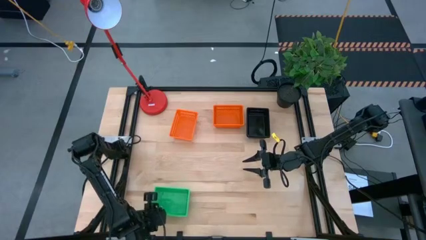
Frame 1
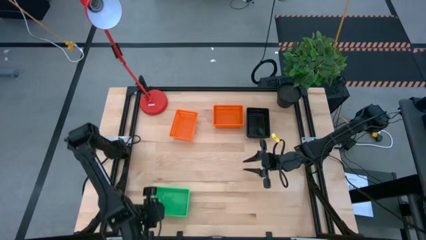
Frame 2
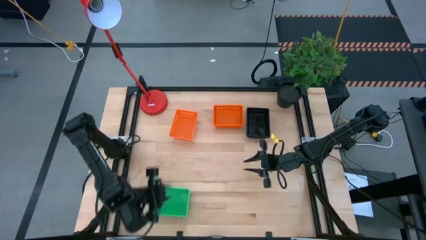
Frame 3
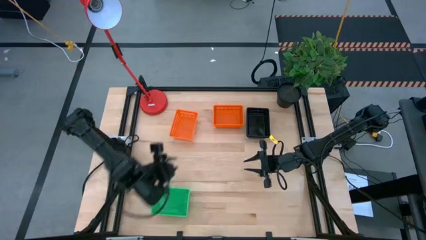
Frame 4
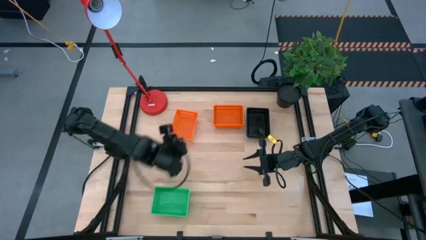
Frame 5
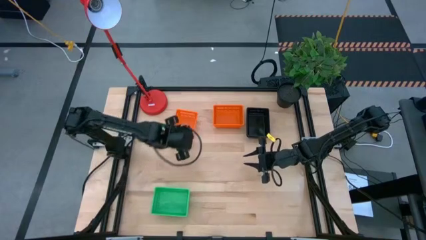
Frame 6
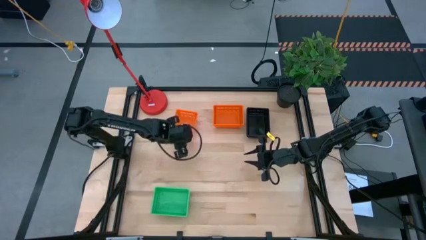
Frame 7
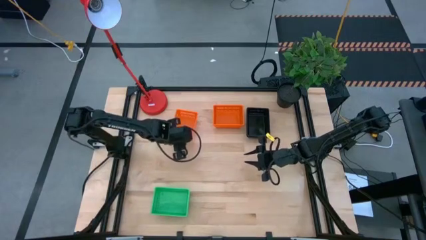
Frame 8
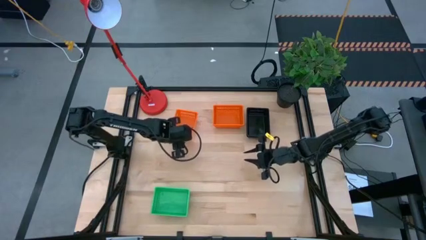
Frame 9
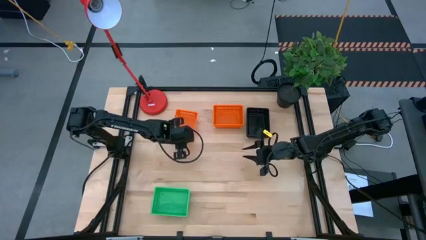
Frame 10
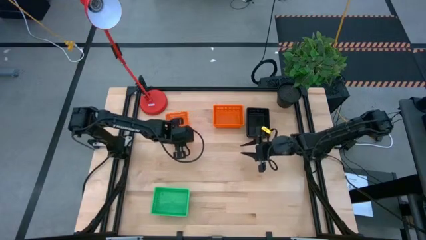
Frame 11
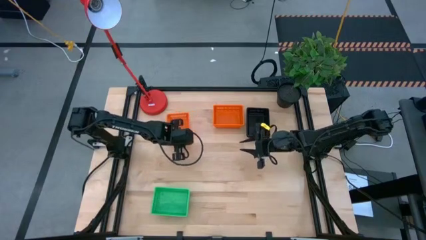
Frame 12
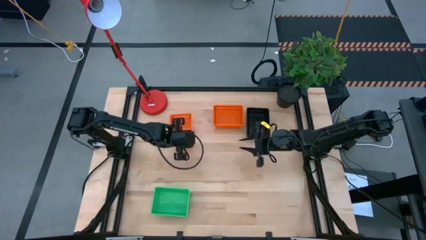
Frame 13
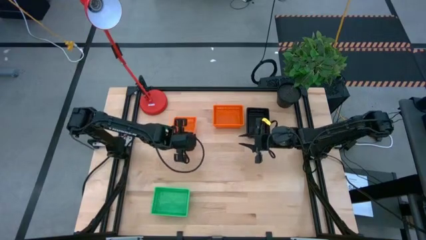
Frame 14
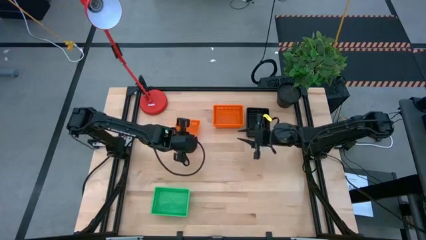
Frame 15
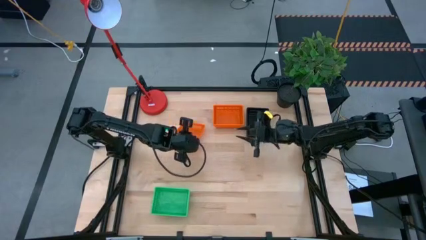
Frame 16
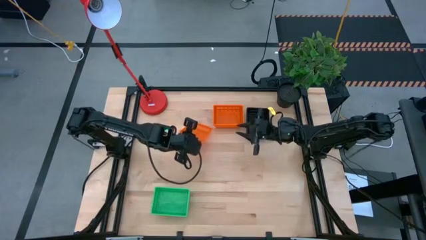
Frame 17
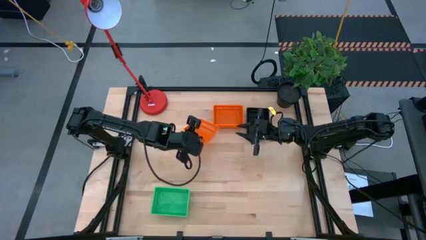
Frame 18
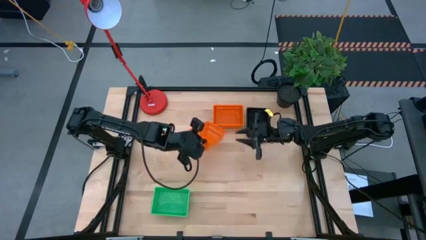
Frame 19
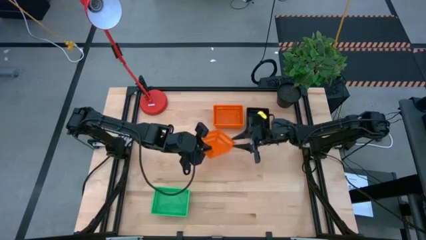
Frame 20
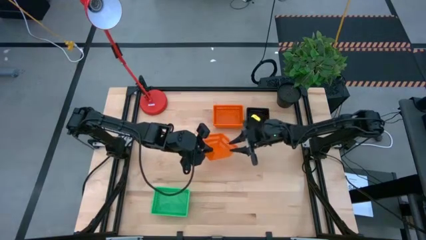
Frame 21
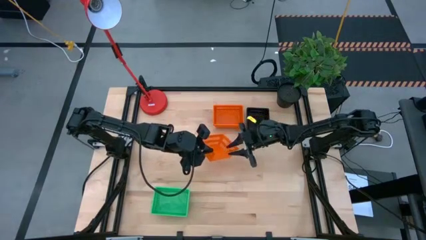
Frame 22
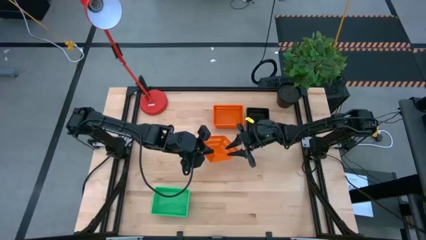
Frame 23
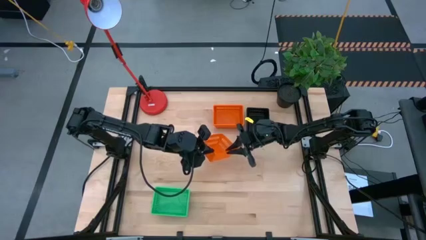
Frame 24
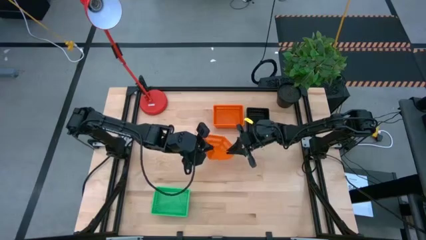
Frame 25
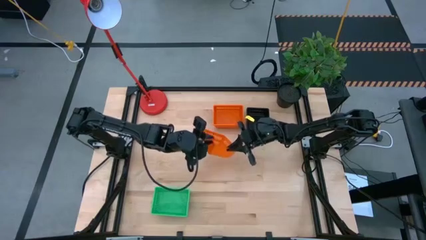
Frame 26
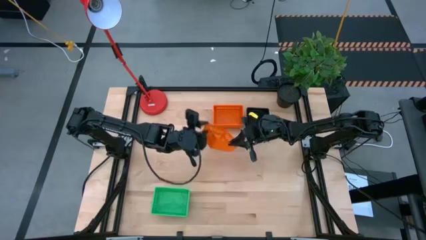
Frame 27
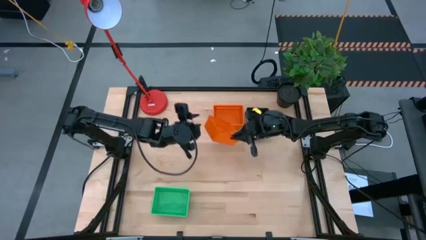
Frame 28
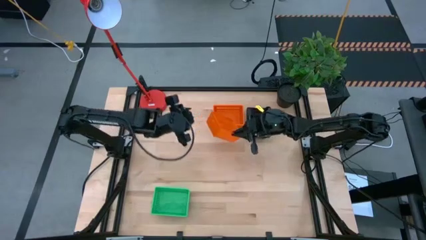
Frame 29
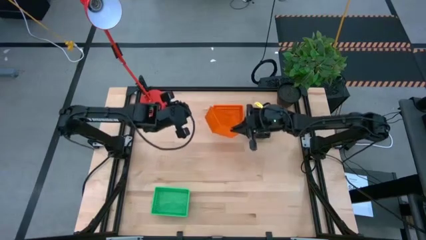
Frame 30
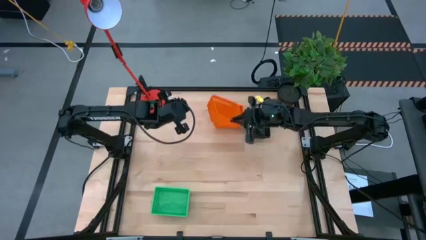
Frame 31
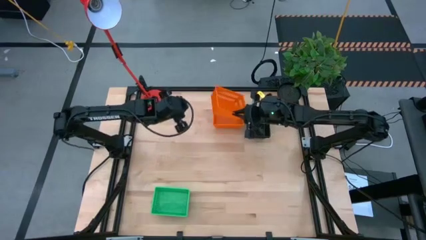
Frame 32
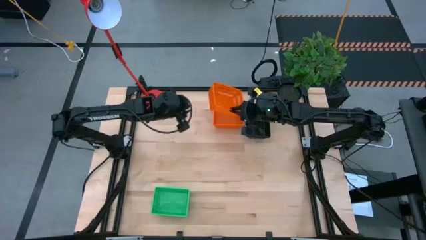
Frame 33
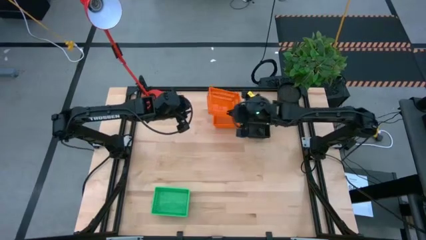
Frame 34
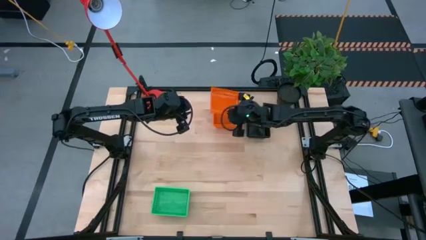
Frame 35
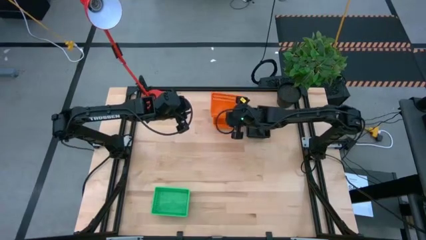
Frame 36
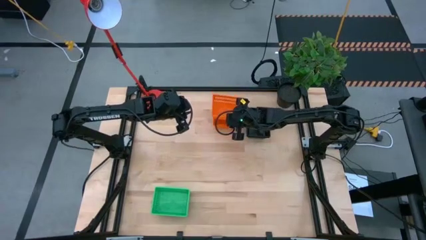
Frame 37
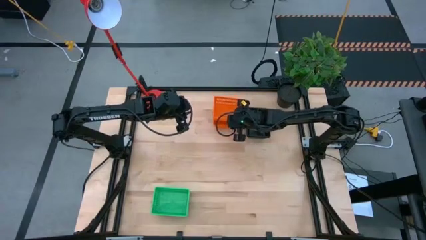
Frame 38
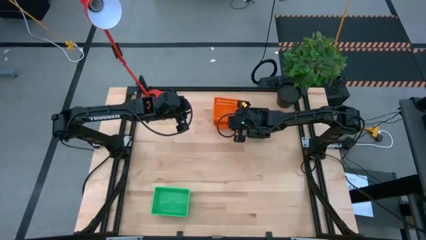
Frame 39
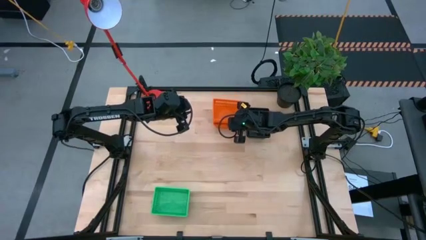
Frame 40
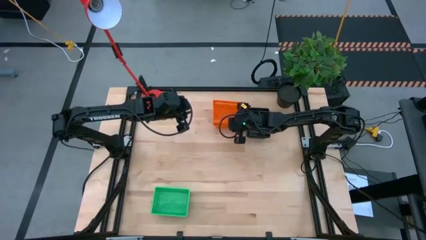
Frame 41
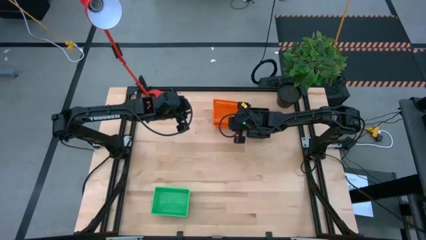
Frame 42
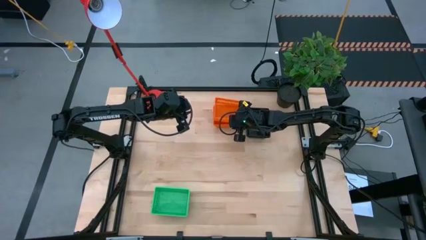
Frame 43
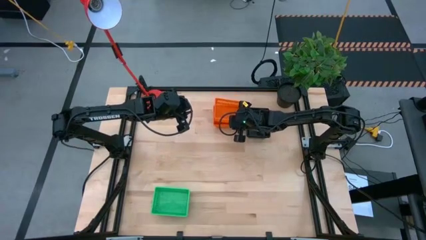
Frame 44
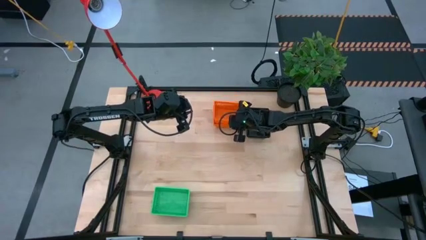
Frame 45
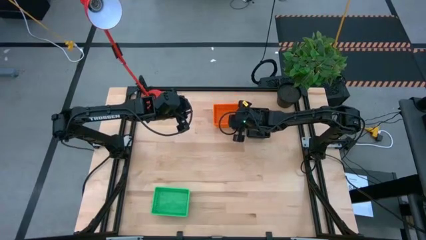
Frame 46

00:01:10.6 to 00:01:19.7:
Stack the left orange basket on top of the orange basket

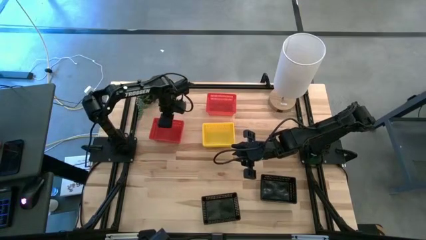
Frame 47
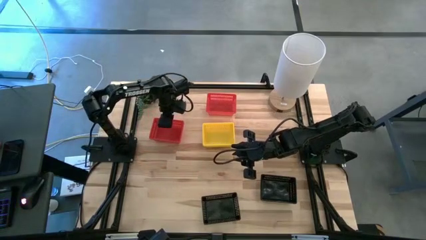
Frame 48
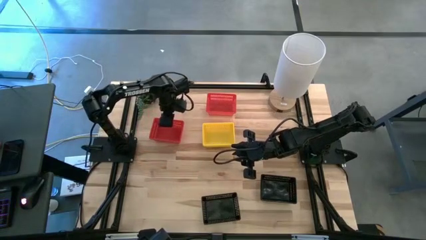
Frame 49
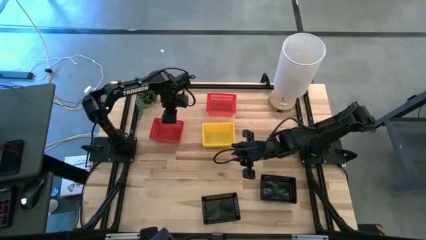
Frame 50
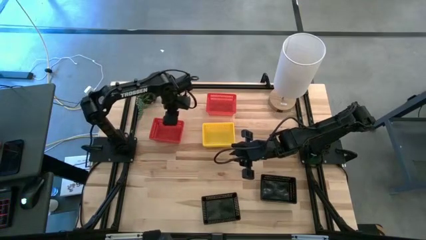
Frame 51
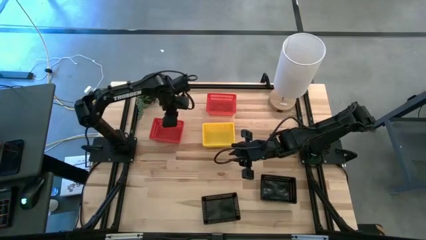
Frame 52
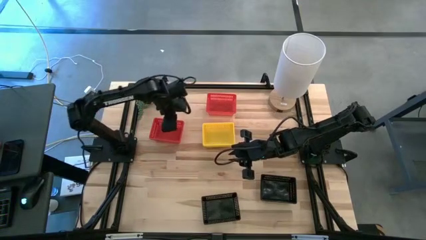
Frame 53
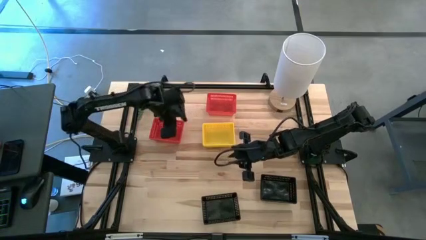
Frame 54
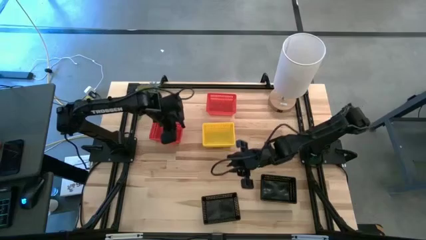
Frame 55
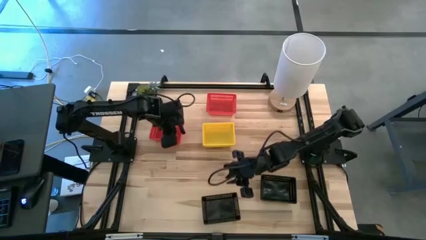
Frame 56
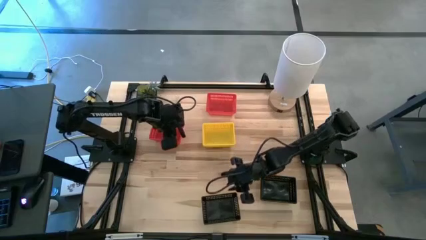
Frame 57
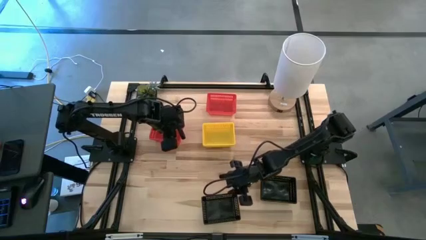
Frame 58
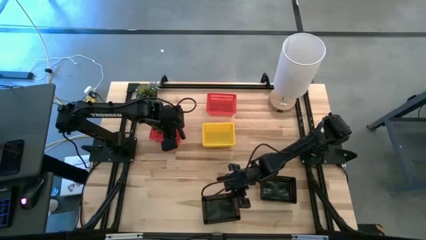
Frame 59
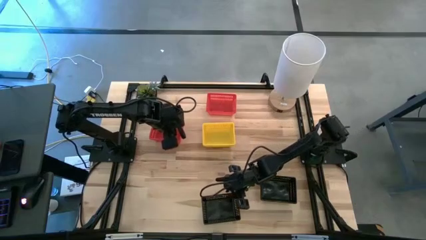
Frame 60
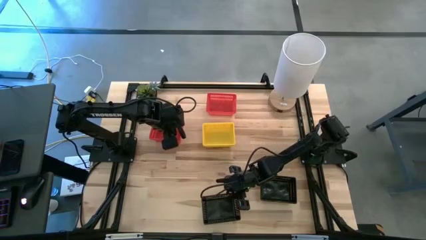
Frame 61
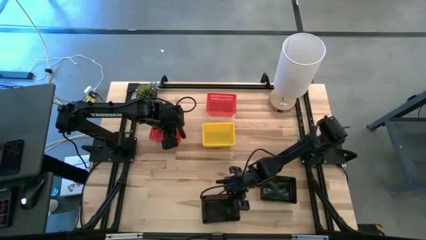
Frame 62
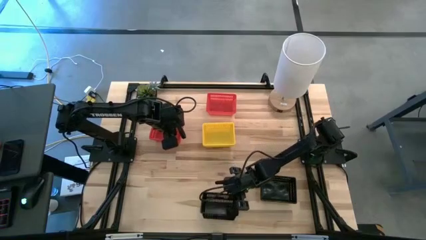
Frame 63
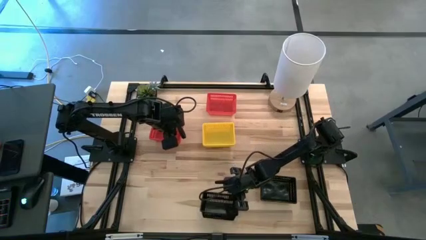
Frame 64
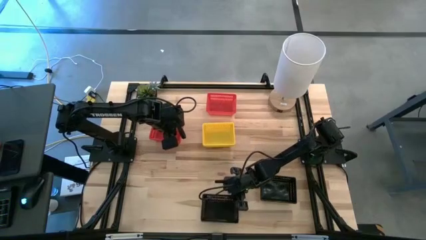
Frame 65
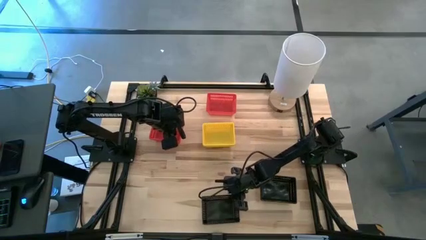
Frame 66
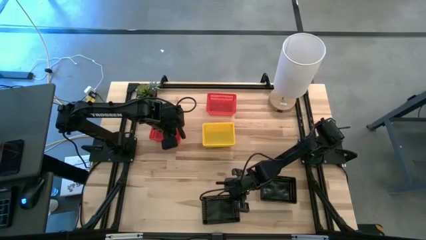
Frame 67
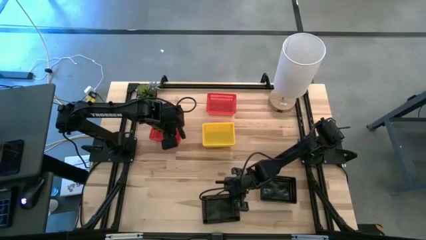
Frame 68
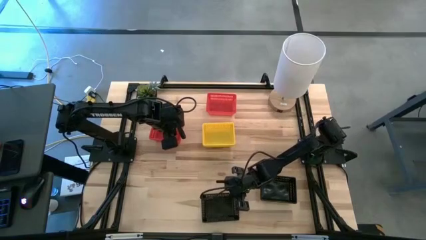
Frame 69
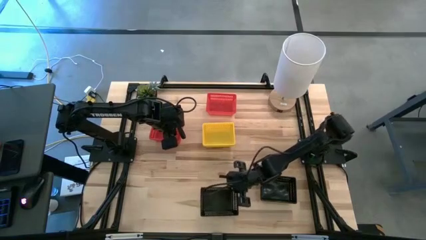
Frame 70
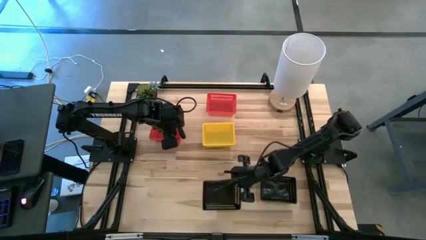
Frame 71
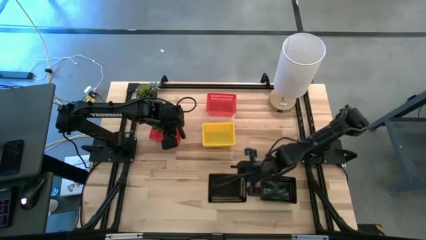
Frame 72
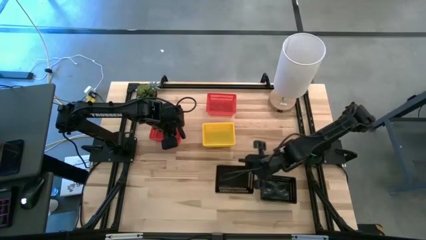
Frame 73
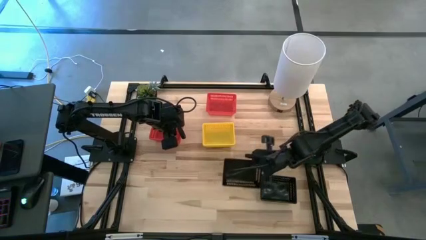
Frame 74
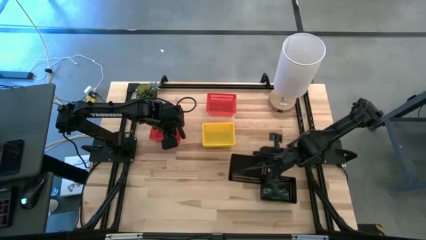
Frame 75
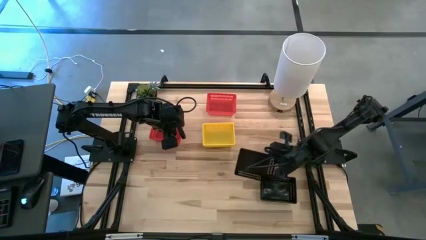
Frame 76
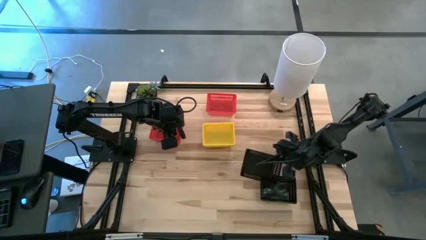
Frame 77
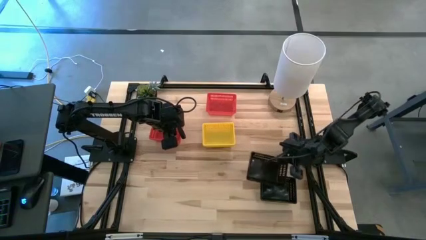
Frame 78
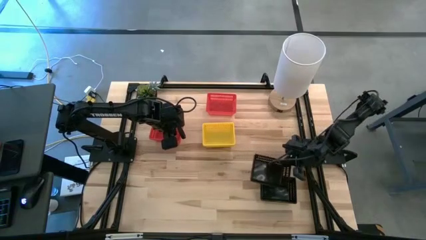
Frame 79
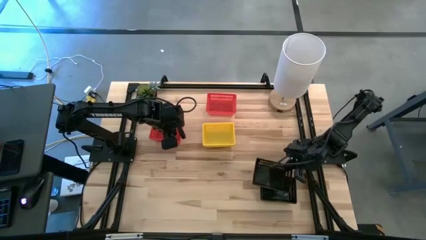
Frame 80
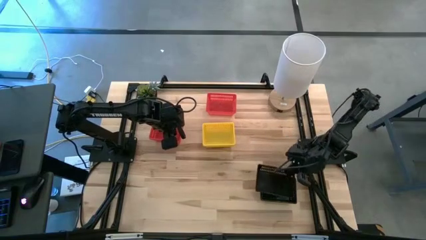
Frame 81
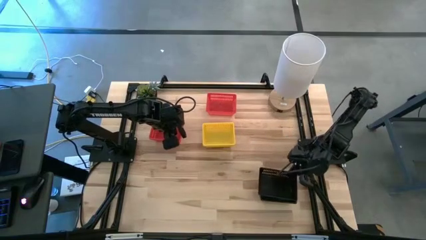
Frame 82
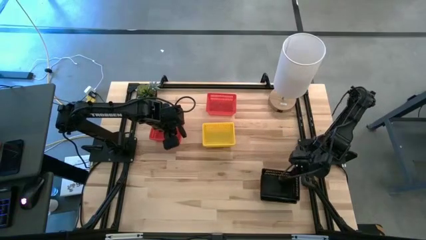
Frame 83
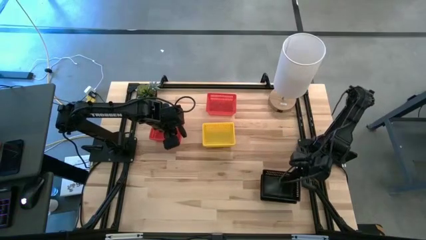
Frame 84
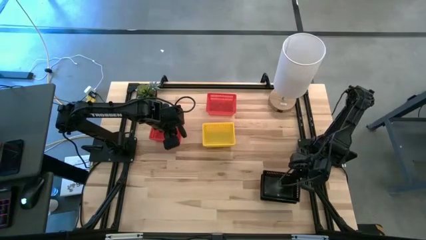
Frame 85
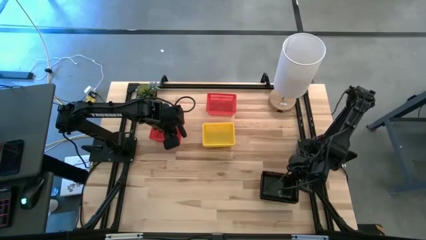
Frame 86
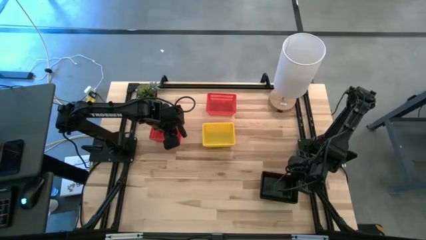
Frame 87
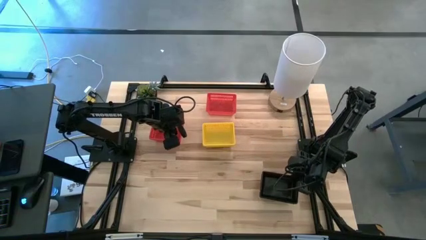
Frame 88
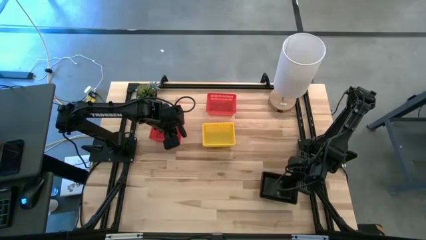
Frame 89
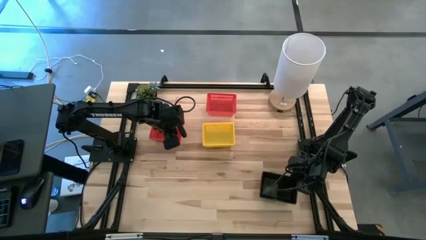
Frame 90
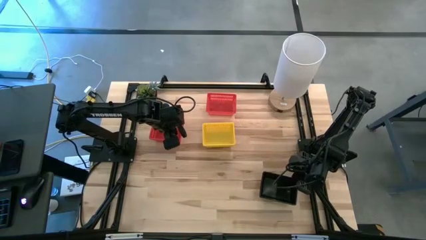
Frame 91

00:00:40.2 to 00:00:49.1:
Stack the left black bin on the stacked black bin
